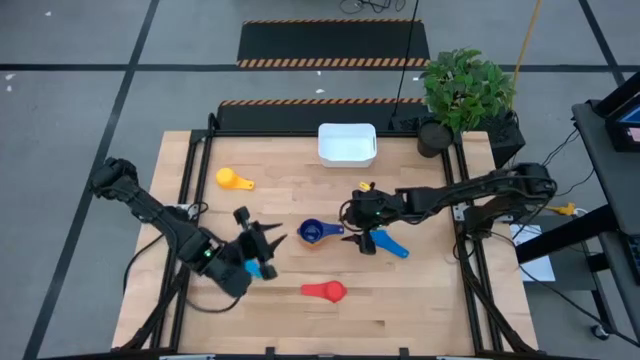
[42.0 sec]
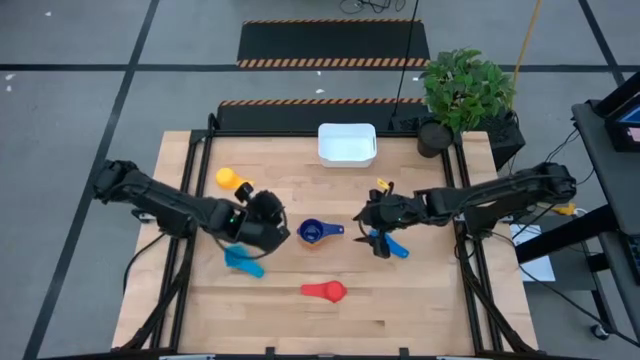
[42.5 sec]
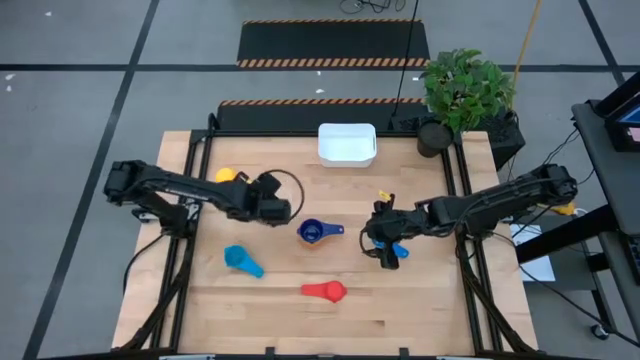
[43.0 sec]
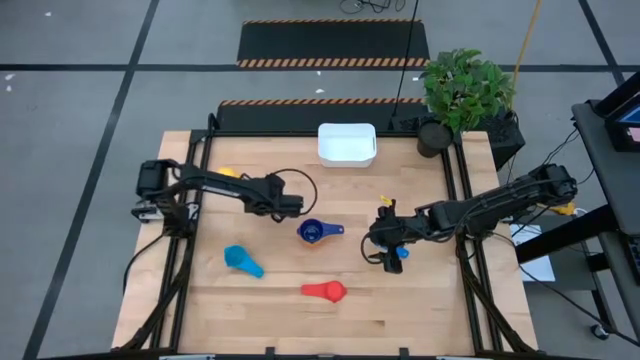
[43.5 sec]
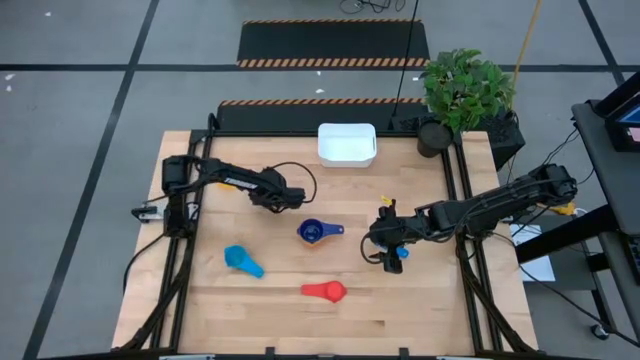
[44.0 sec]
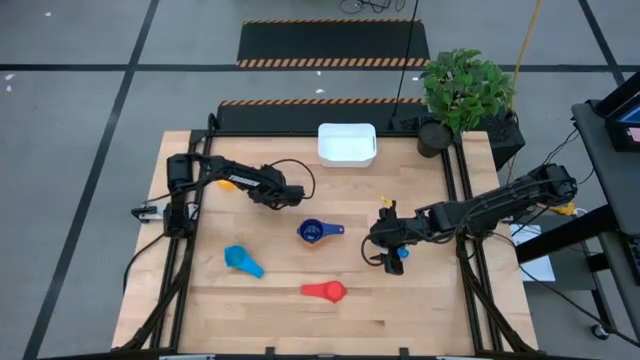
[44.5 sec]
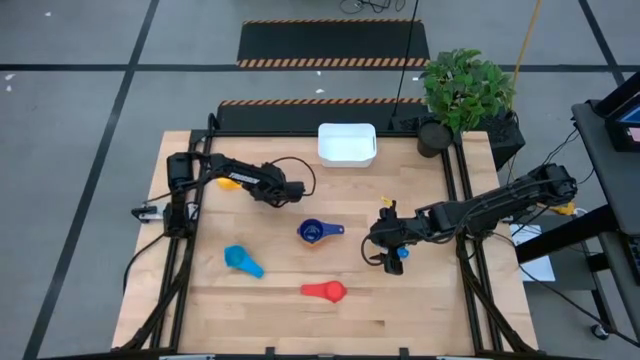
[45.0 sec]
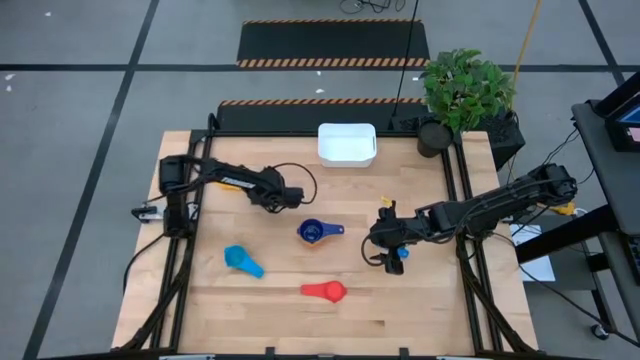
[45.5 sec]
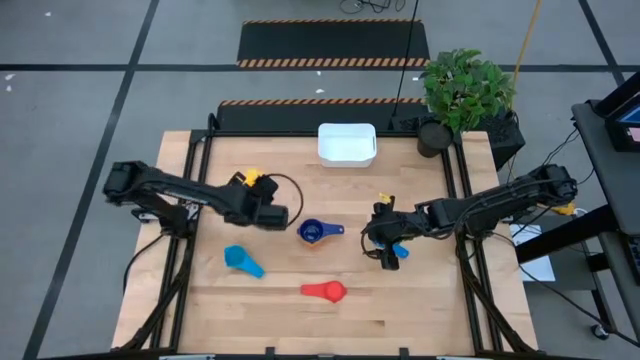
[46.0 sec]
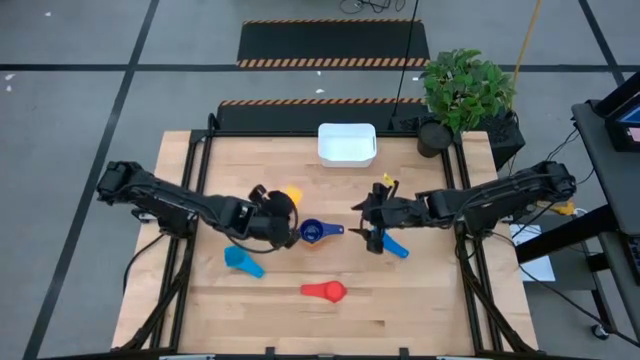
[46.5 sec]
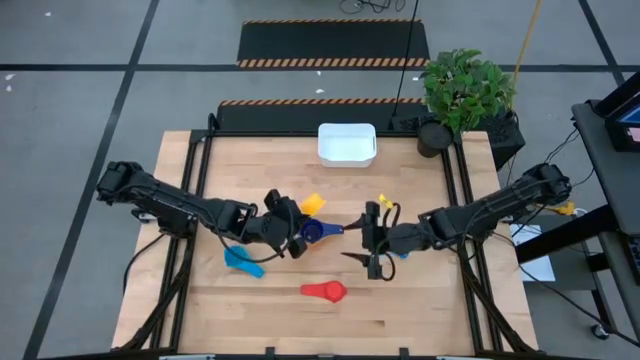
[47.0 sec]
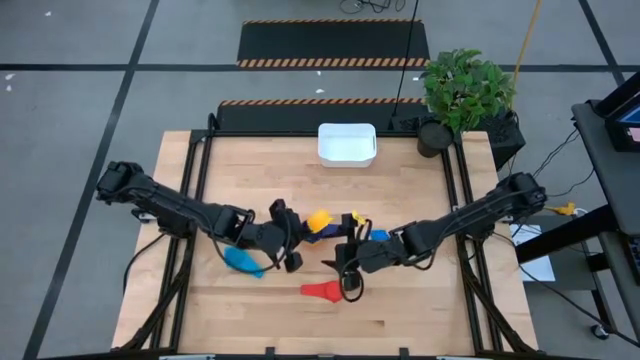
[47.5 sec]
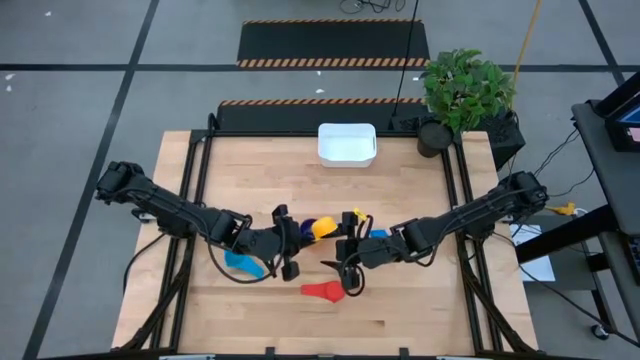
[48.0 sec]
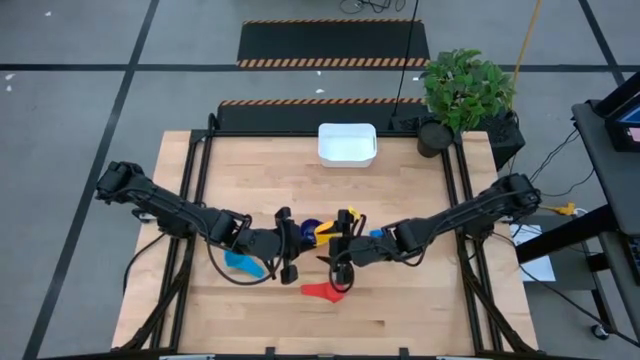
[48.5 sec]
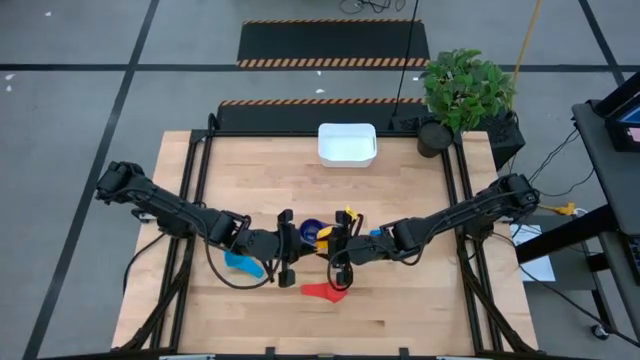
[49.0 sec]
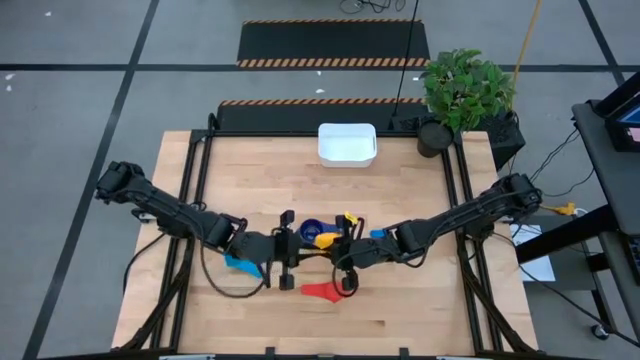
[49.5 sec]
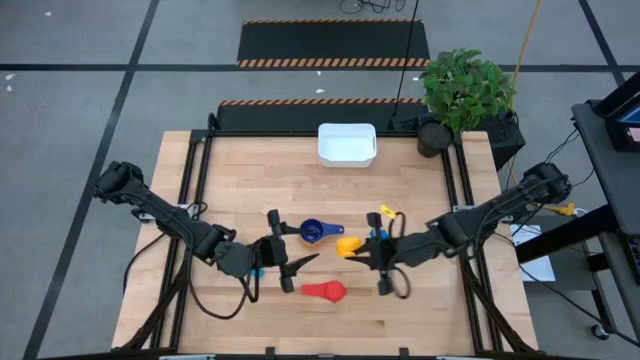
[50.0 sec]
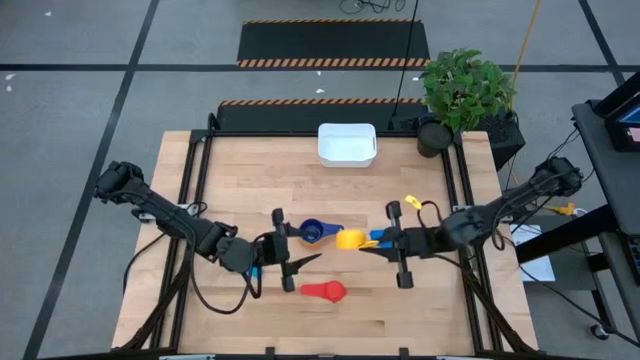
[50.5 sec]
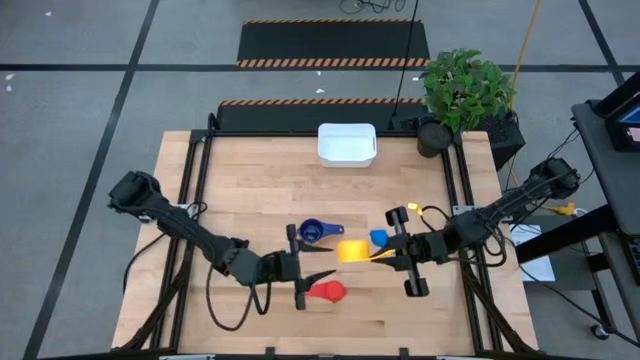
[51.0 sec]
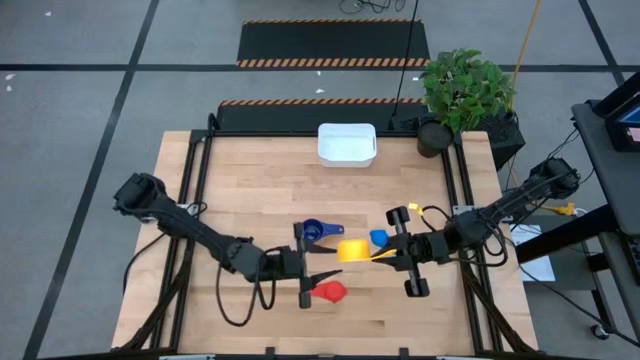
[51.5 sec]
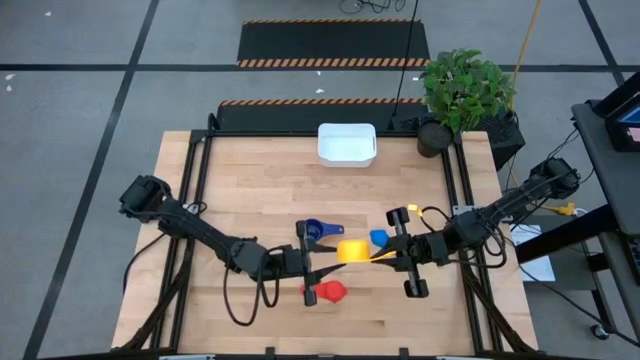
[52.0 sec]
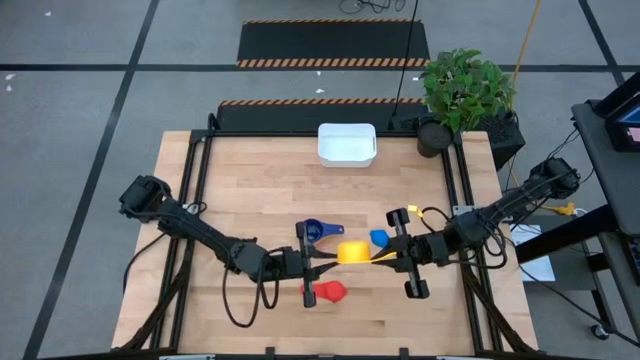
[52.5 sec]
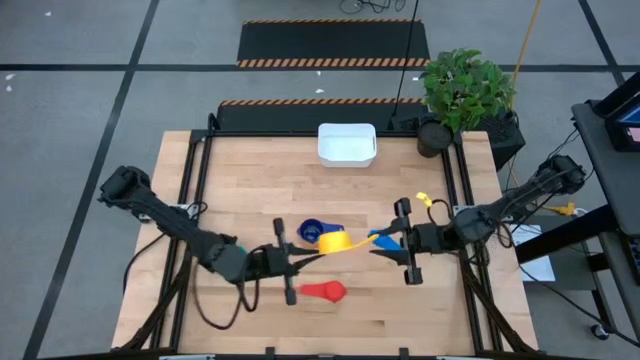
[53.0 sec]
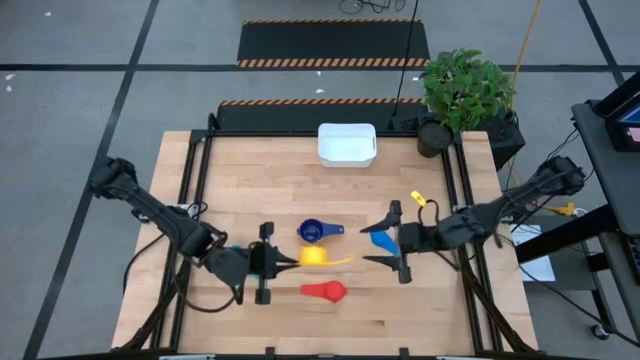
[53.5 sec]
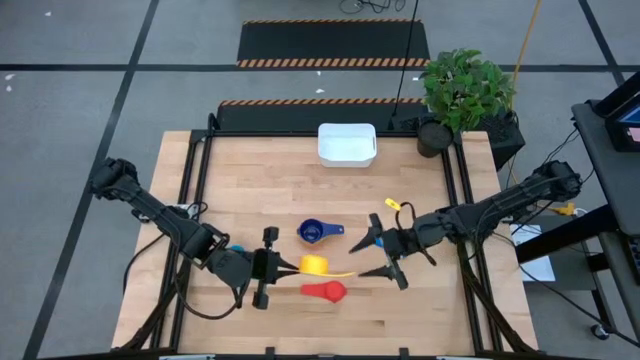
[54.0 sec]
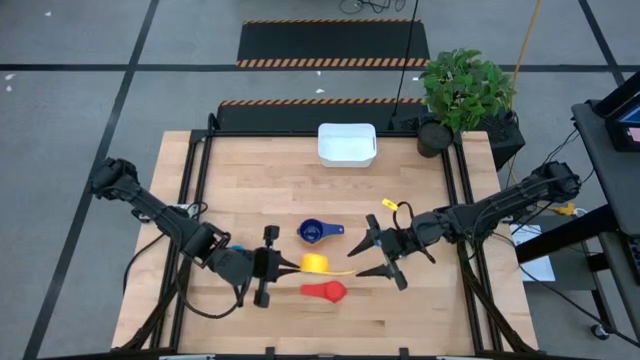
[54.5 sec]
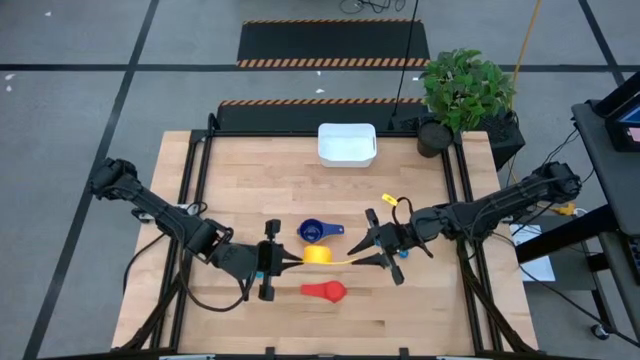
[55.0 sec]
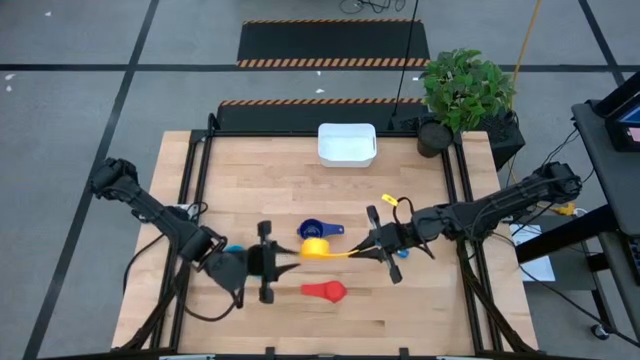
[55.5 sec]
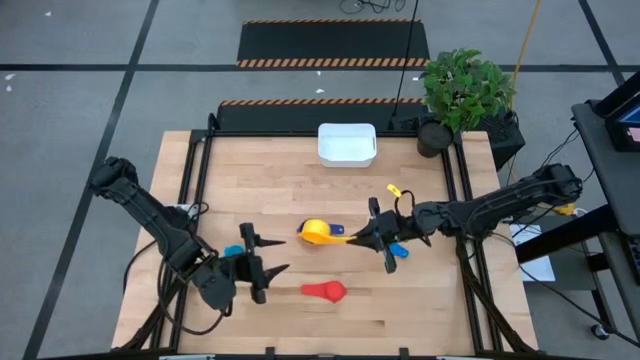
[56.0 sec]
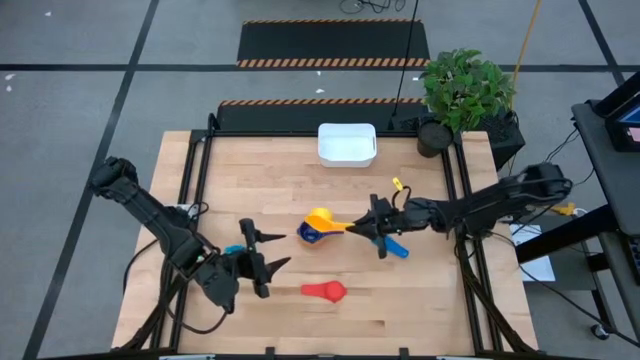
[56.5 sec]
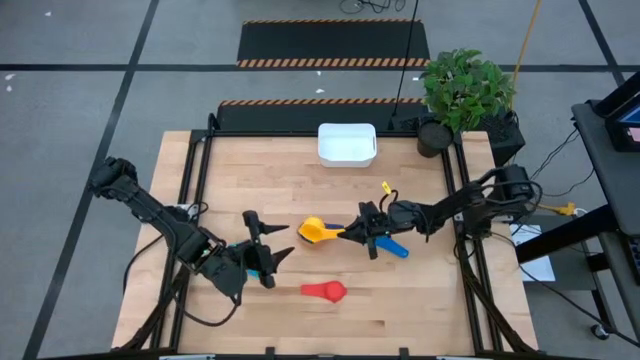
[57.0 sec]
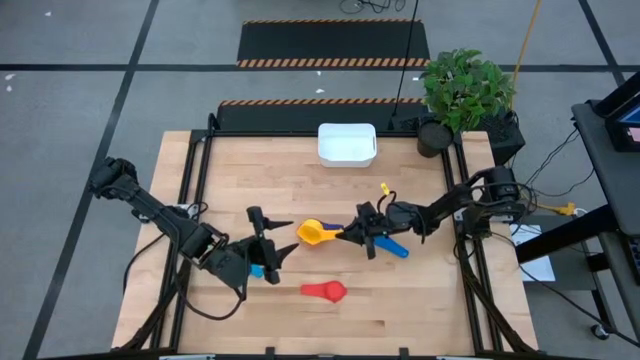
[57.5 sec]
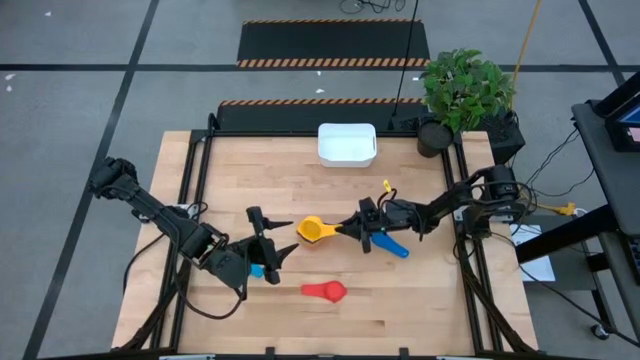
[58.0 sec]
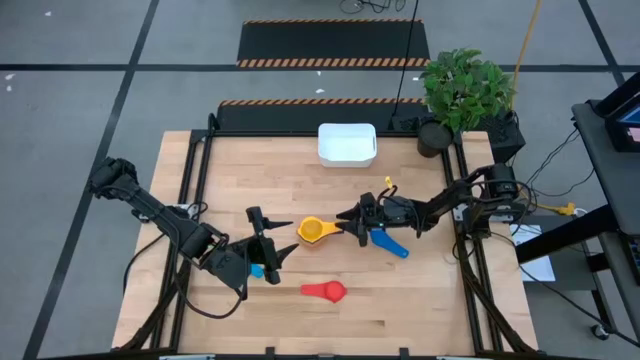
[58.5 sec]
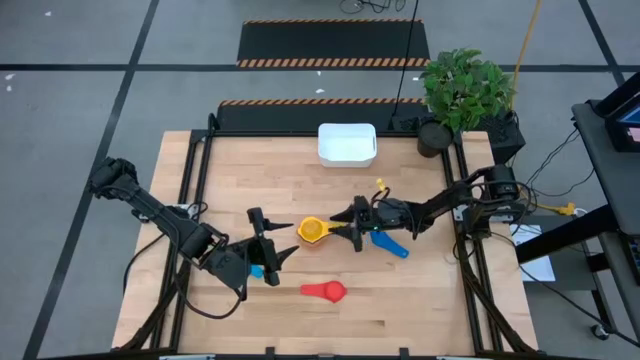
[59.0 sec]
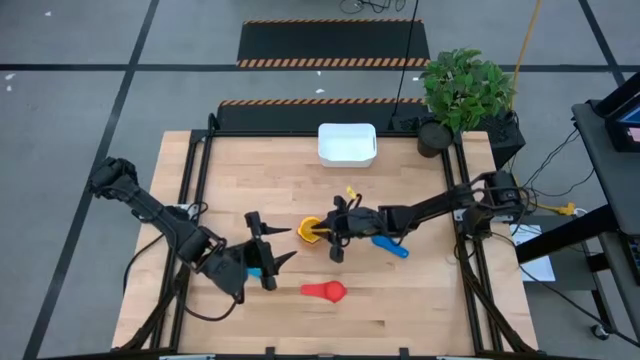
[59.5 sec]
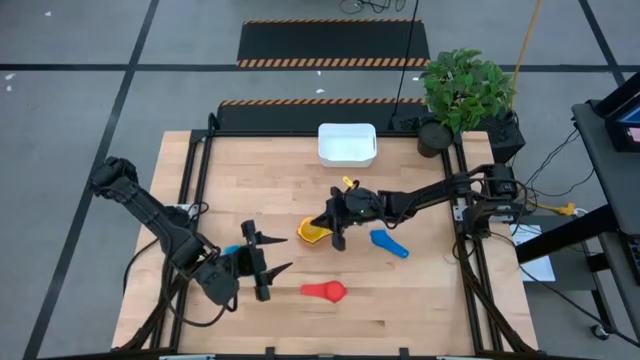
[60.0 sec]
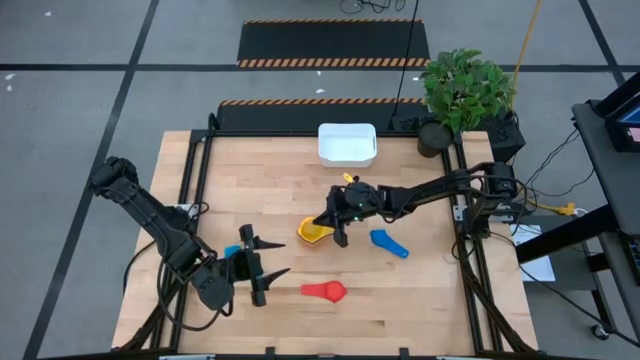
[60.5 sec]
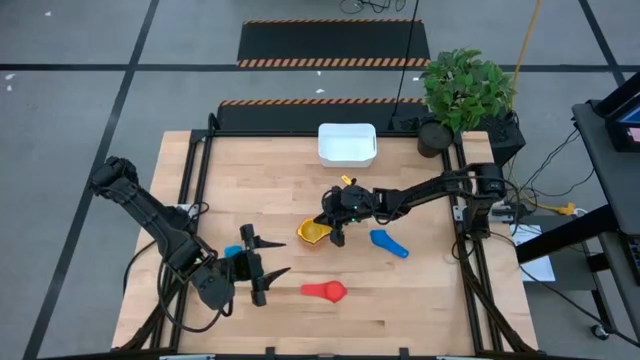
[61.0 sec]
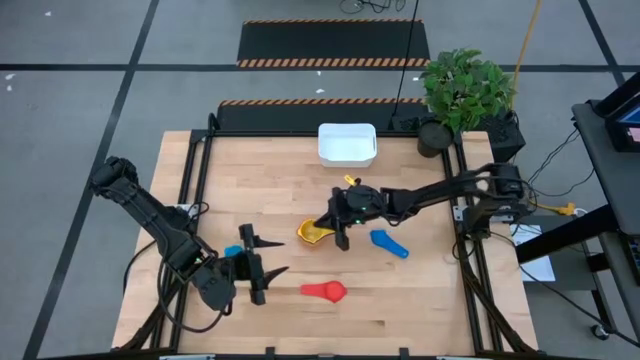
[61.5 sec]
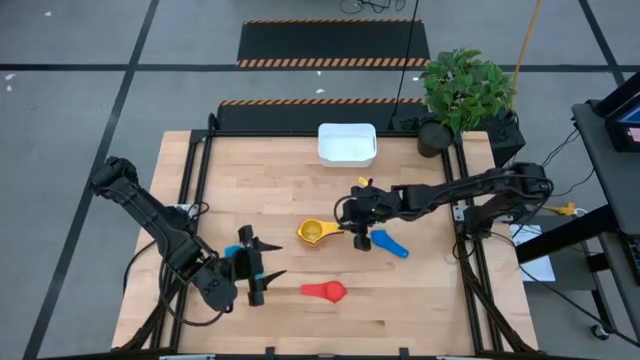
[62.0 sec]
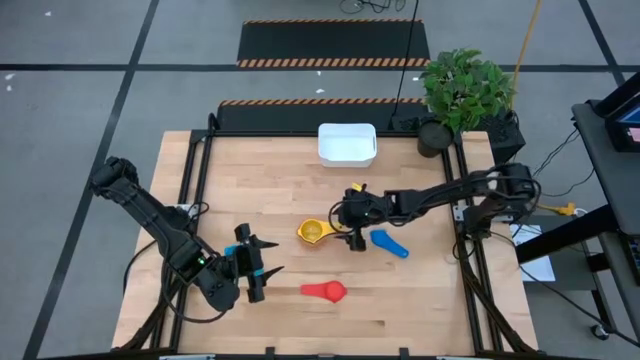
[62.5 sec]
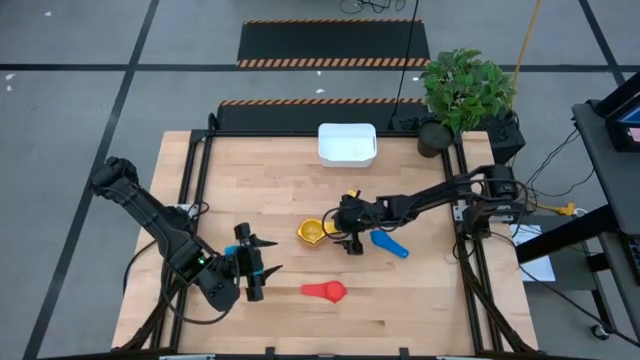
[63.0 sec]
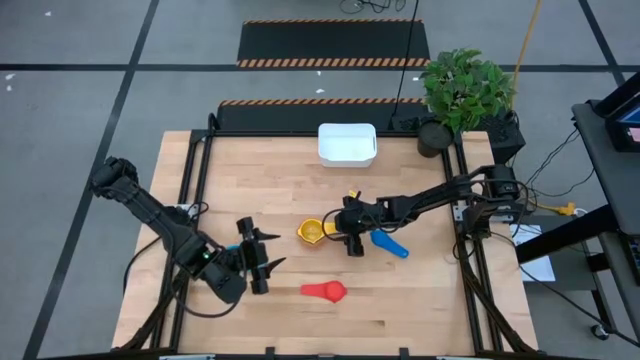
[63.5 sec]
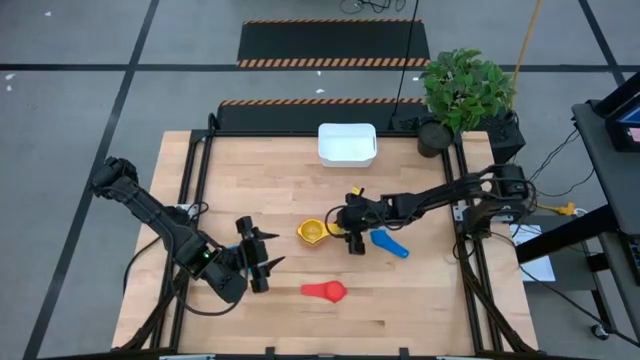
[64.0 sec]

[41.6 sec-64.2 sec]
Task: Nest measuring cups in basket
Stack the yellow measuring cup into the dark blue measuring cup
